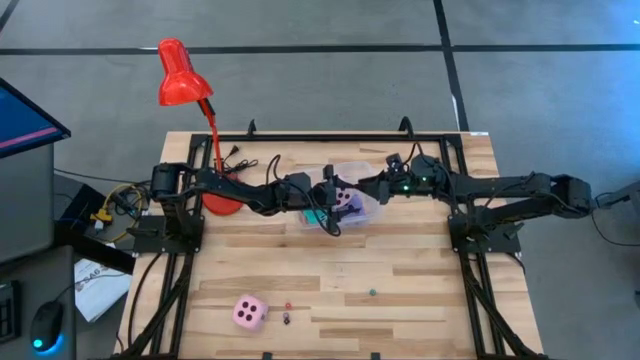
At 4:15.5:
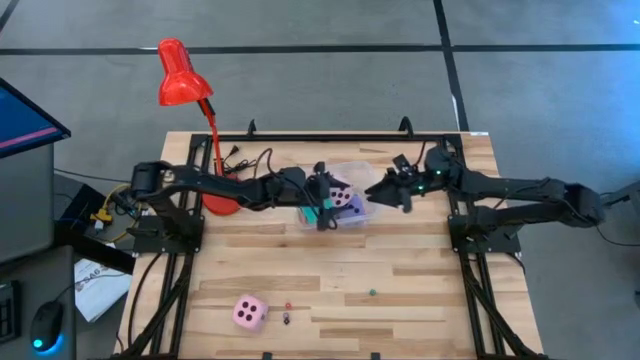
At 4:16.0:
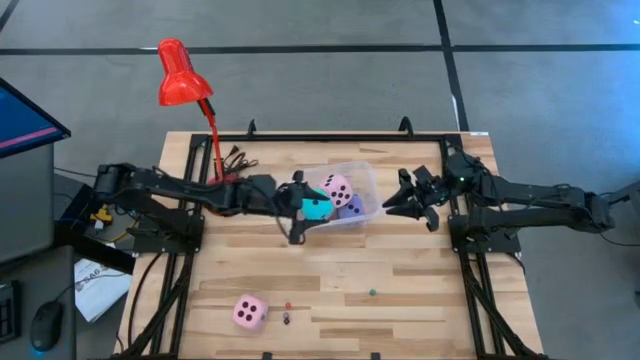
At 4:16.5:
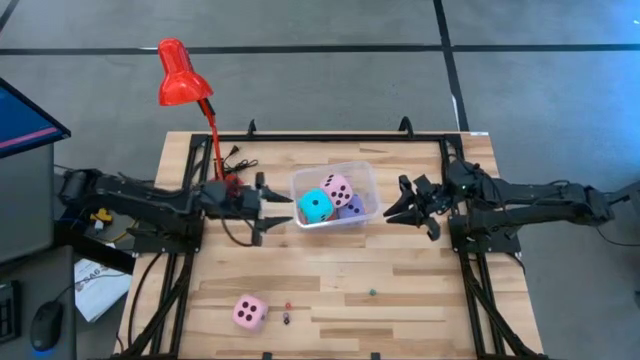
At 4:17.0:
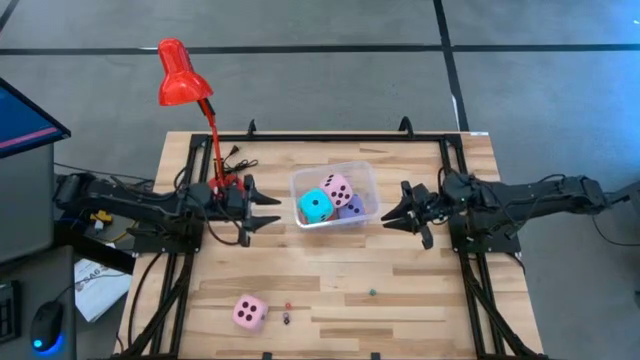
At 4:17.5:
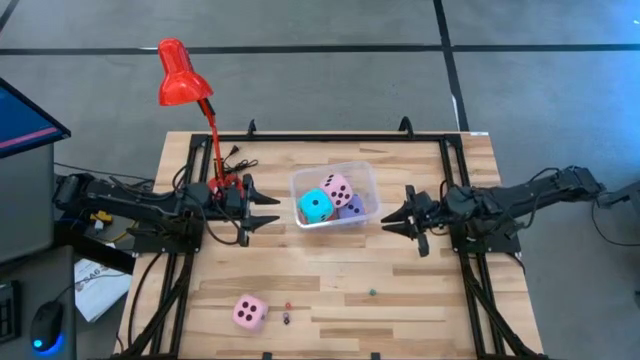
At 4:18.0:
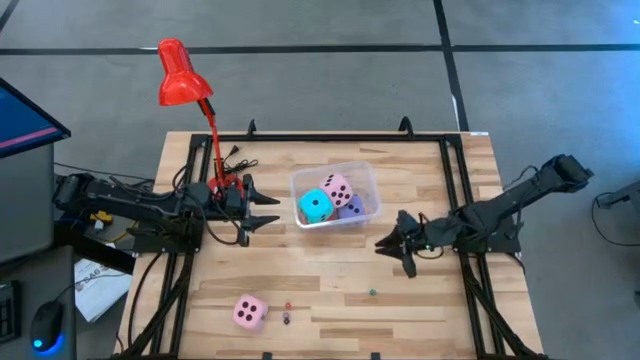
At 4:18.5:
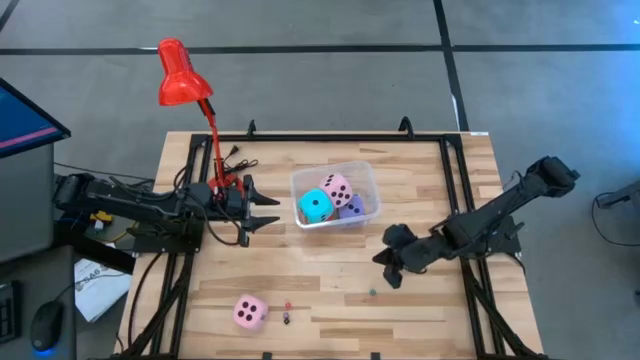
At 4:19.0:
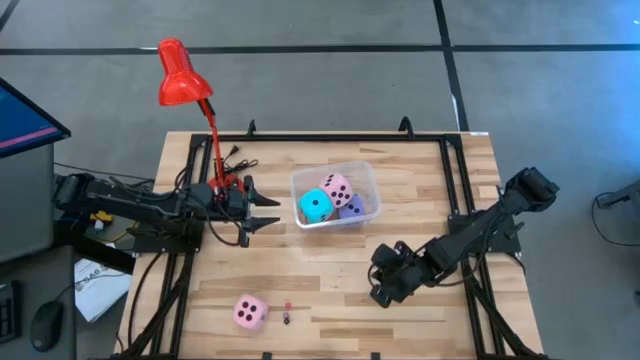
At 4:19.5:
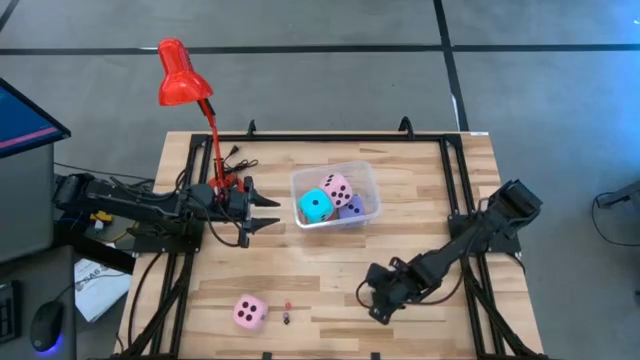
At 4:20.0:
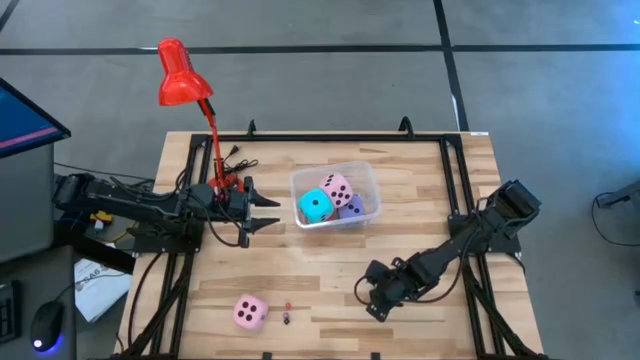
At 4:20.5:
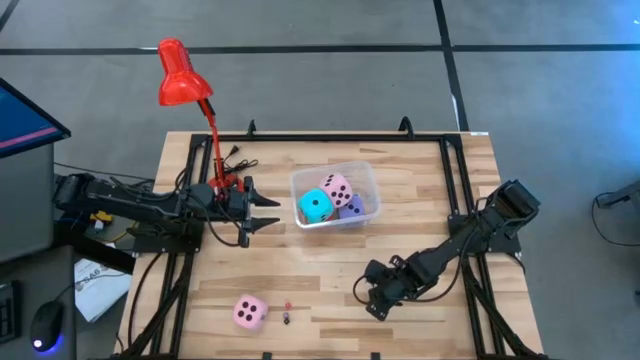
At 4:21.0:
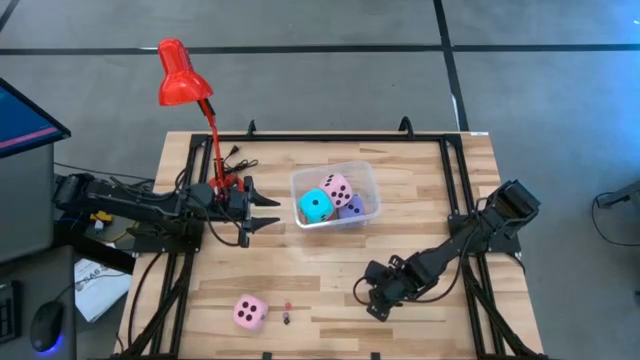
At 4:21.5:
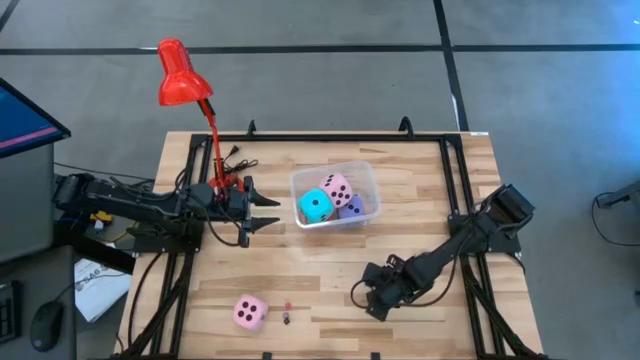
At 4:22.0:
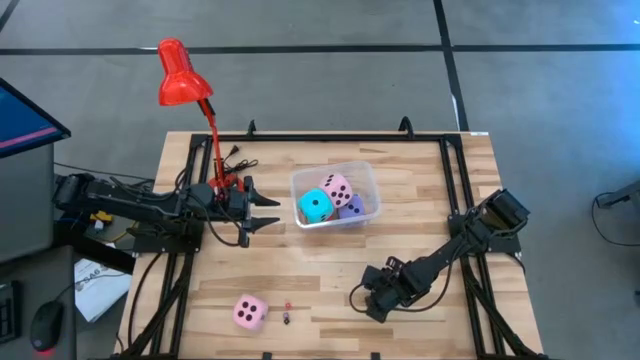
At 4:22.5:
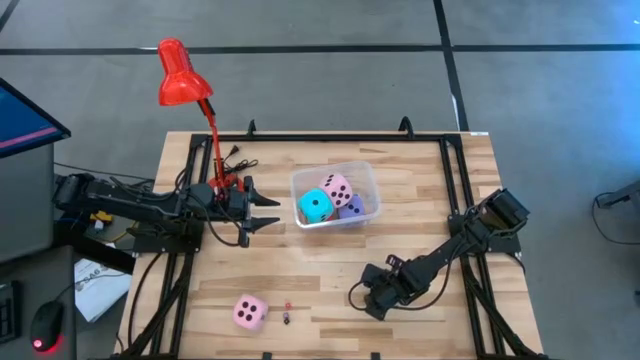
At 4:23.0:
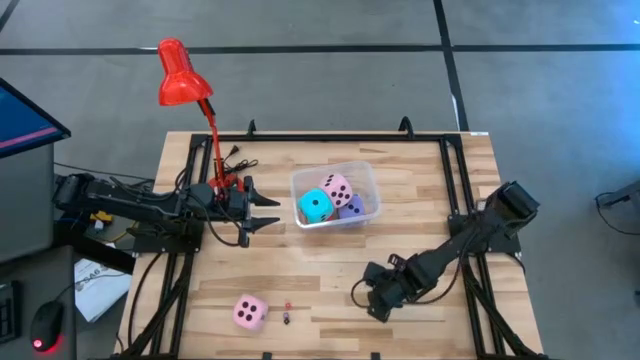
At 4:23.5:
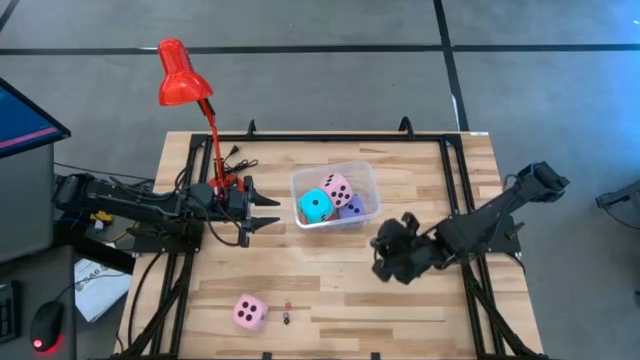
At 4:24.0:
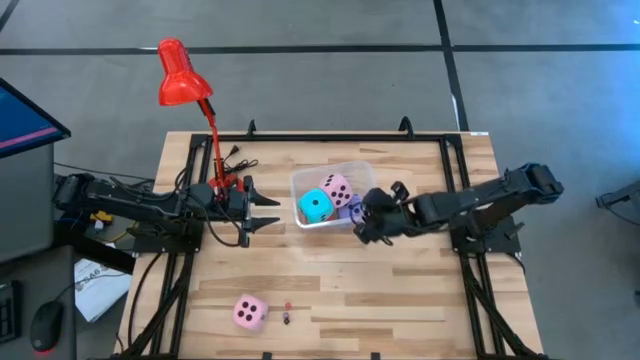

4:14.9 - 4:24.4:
Task: Pick & Place Dice
Put the small green die into the transparent bin

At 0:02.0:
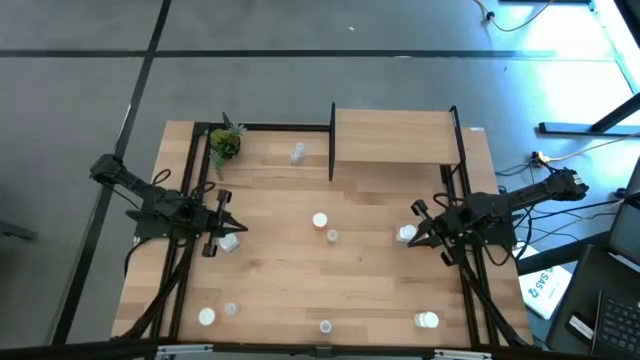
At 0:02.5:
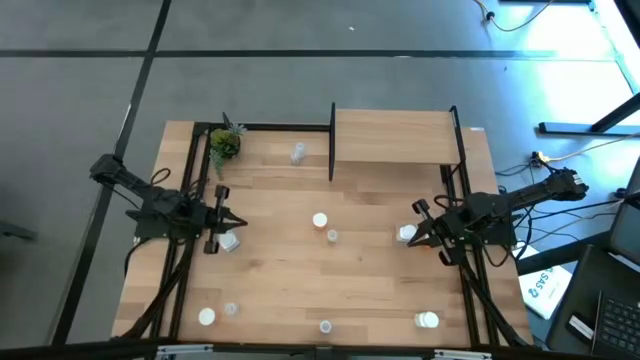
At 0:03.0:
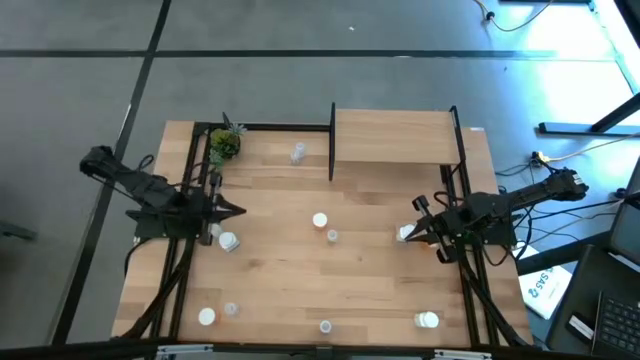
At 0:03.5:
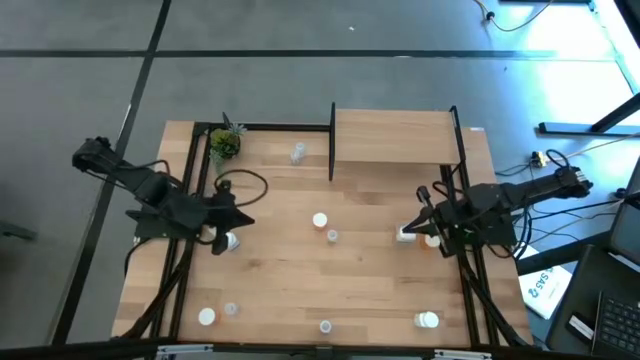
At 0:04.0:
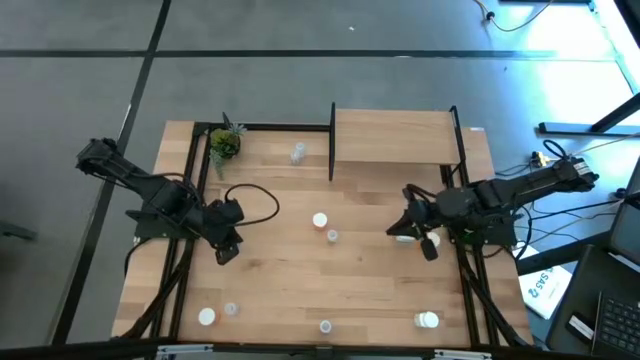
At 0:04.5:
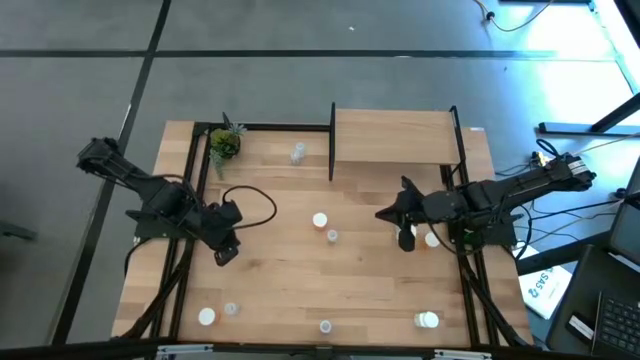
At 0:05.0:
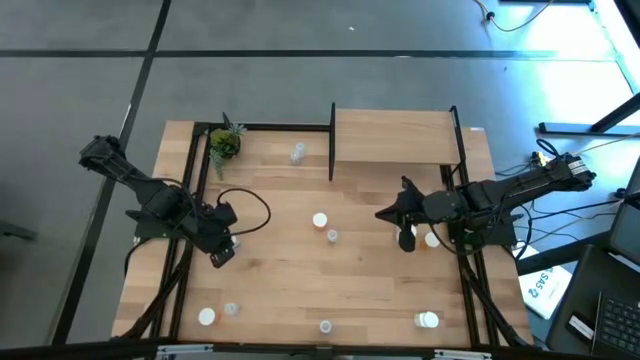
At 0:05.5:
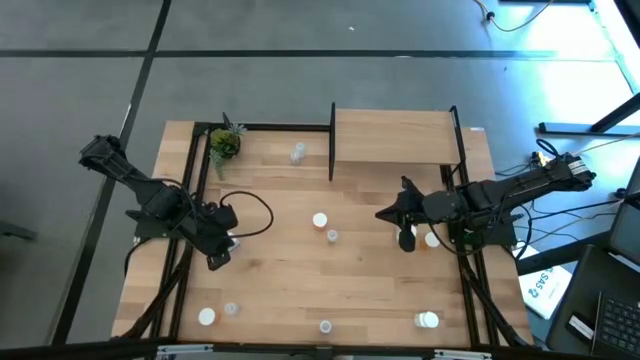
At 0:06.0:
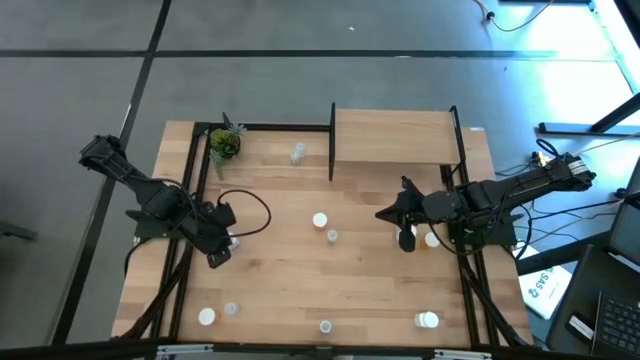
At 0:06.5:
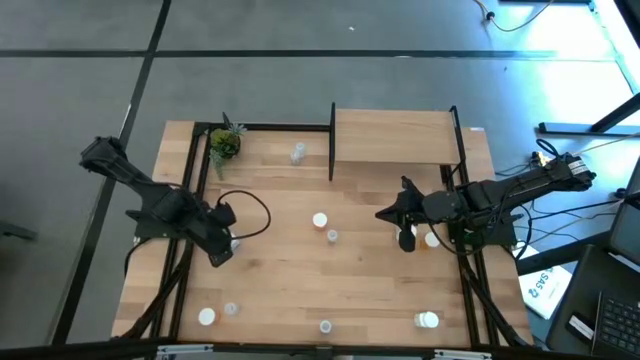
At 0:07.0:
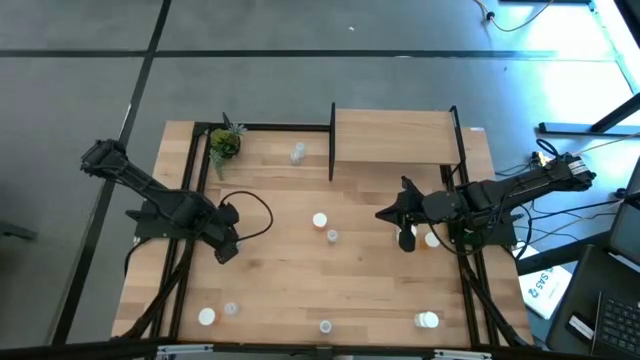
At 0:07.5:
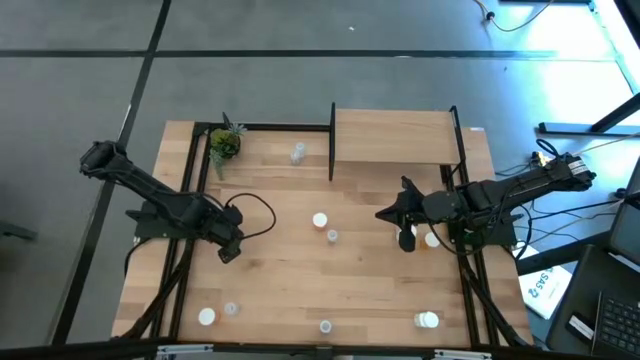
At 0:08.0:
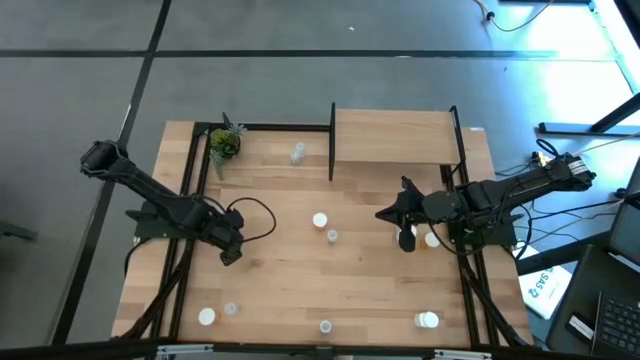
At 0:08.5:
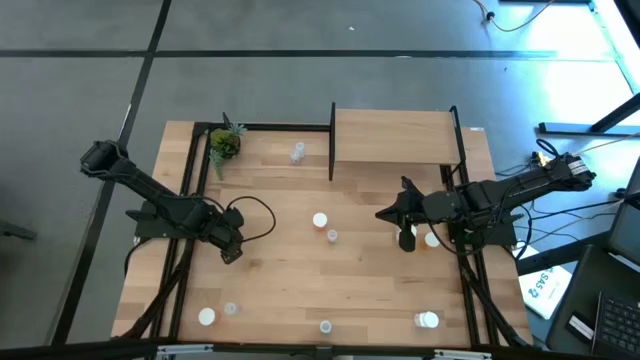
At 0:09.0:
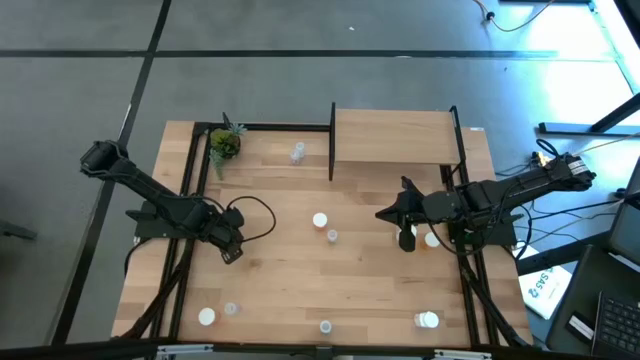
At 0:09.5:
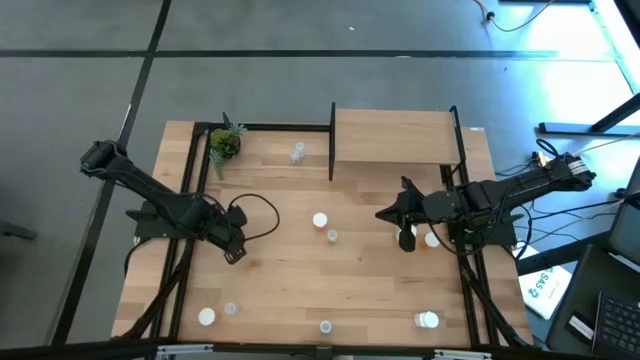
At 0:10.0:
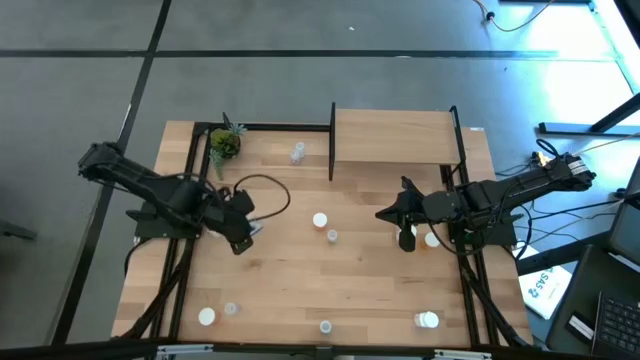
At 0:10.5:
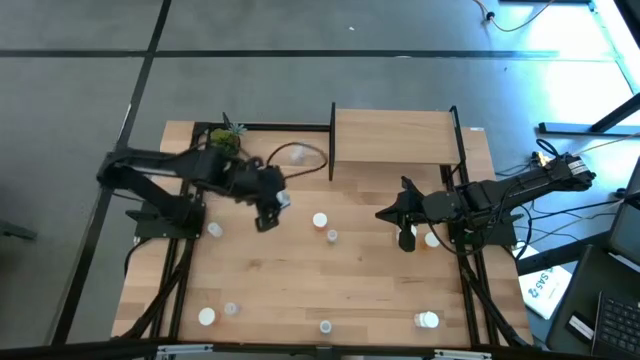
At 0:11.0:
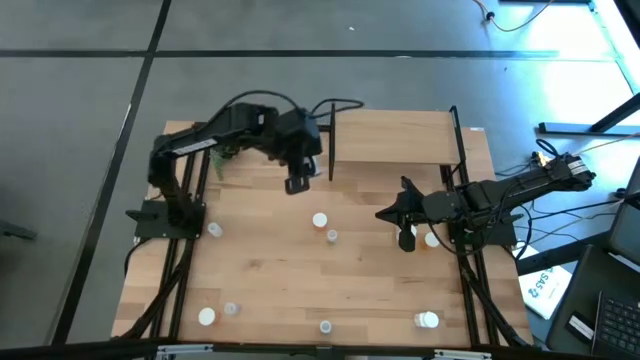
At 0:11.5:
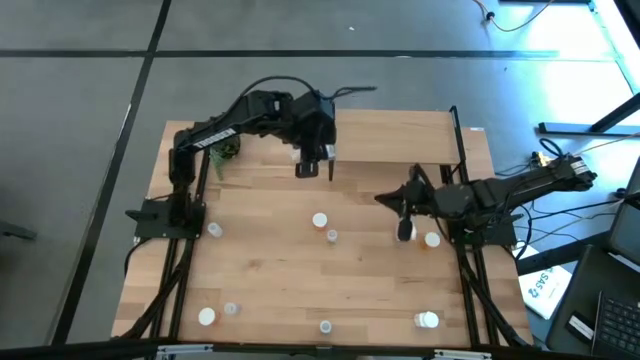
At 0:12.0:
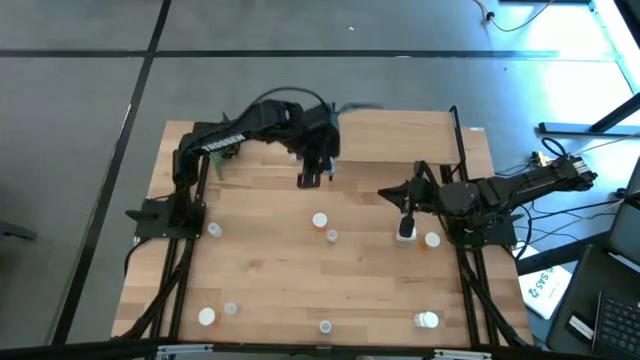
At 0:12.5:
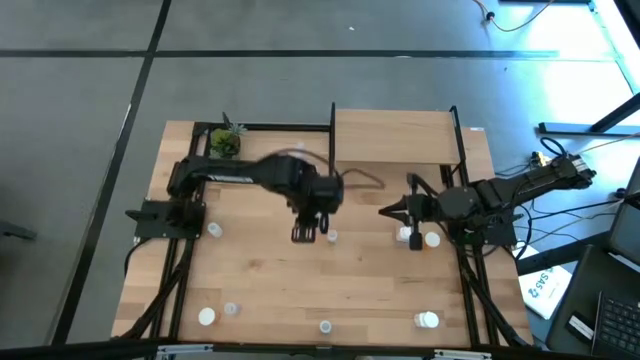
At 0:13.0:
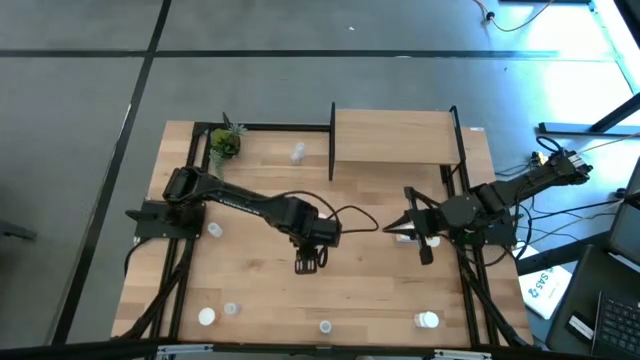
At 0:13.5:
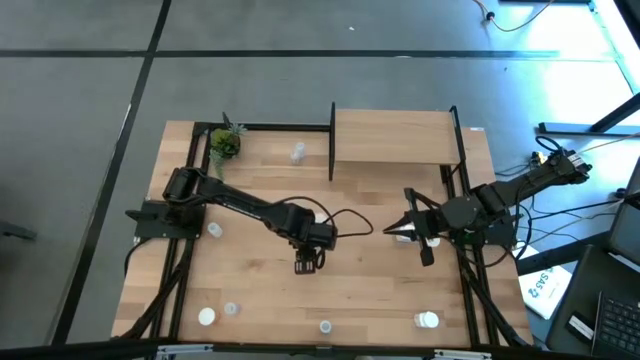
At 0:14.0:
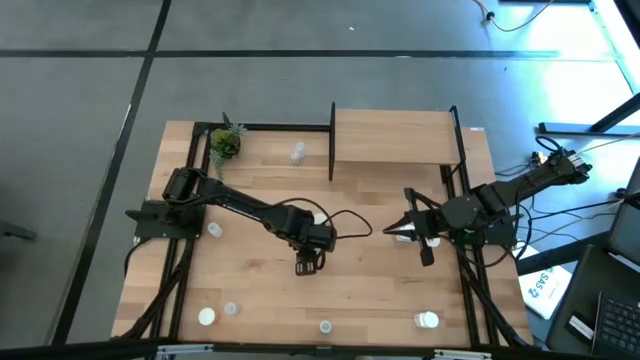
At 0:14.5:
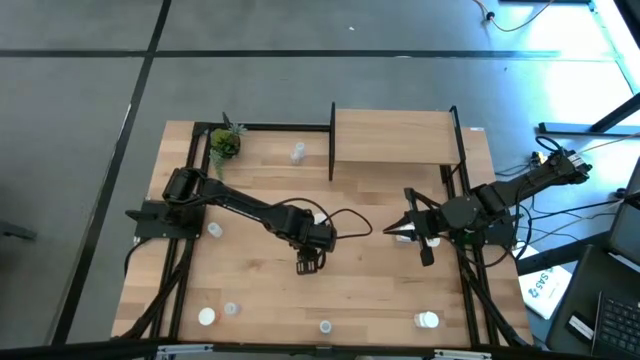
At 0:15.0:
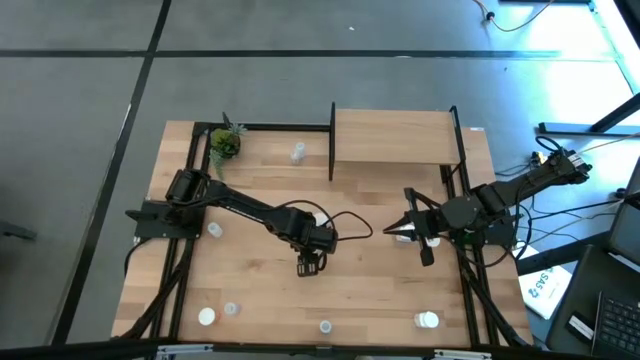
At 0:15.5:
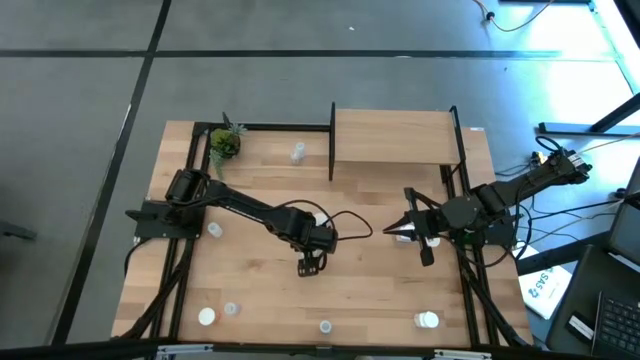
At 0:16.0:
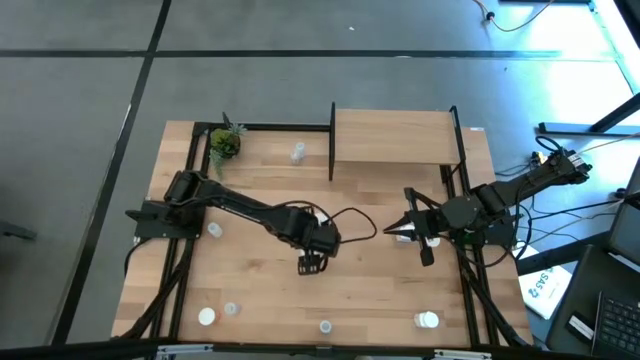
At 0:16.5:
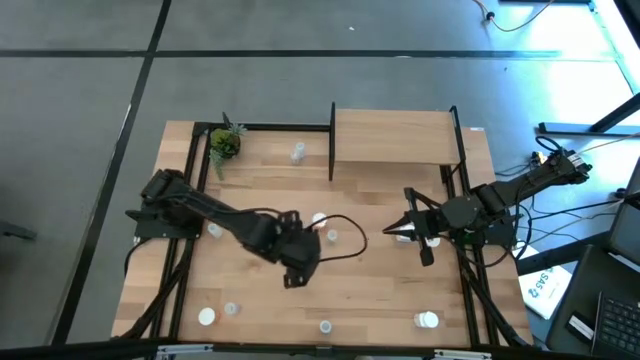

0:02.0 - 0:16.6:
Task: Pick and place medicine bottles onto shelf by color
Put the left white pill bottle on the shelf
